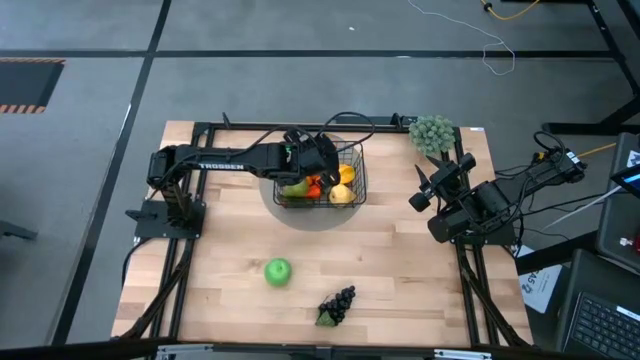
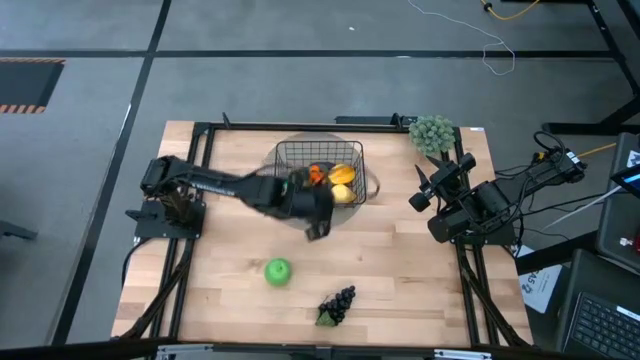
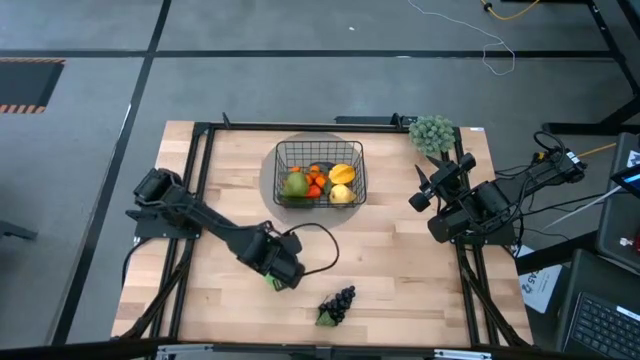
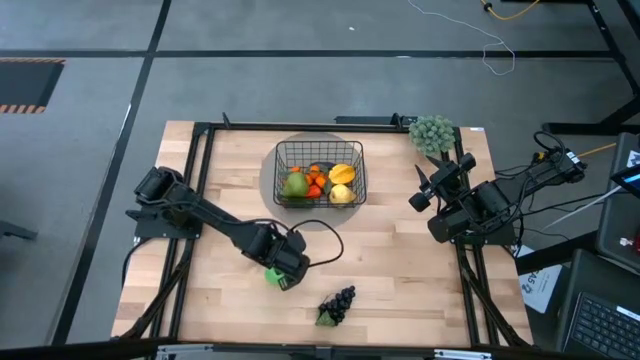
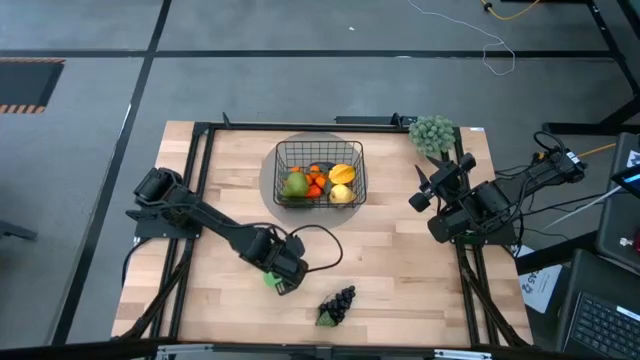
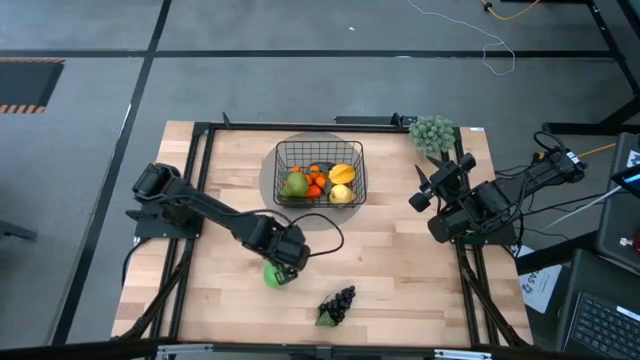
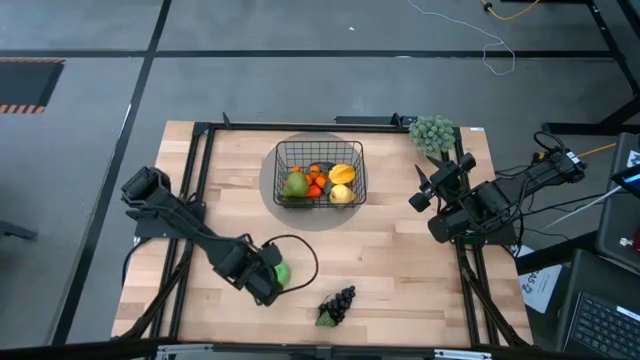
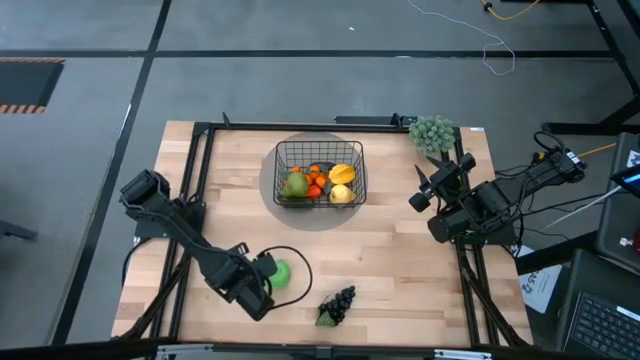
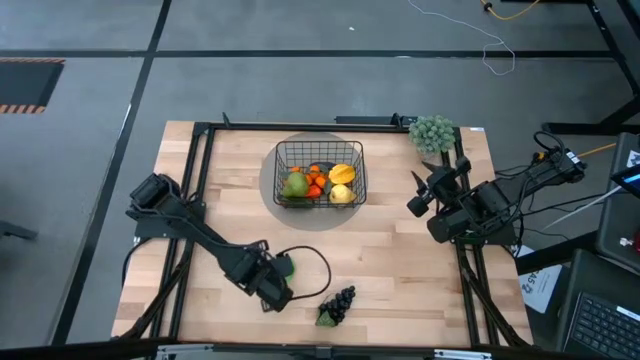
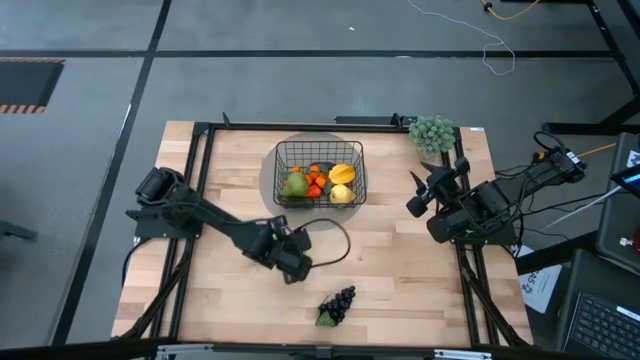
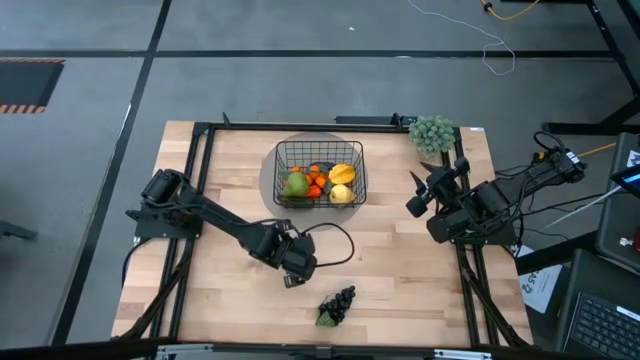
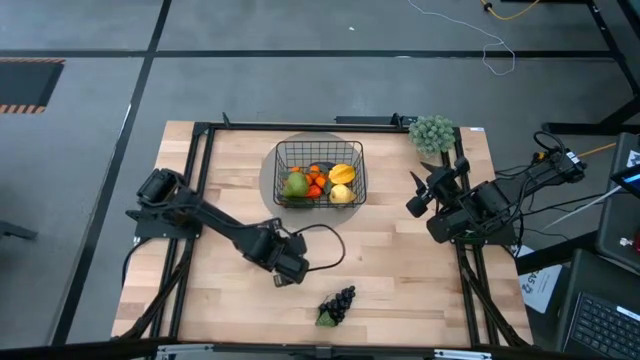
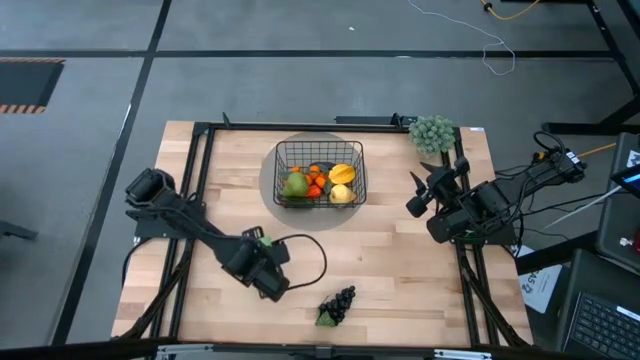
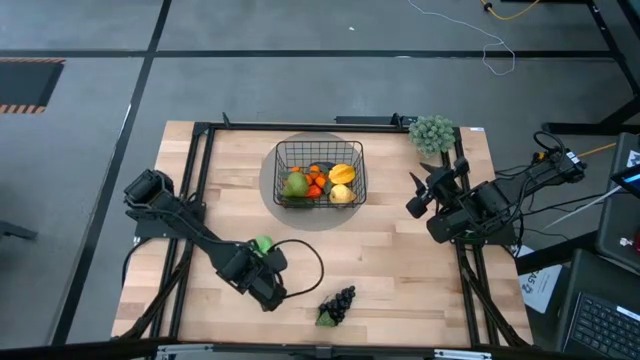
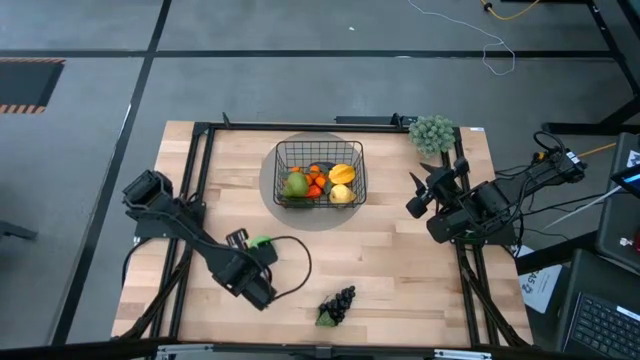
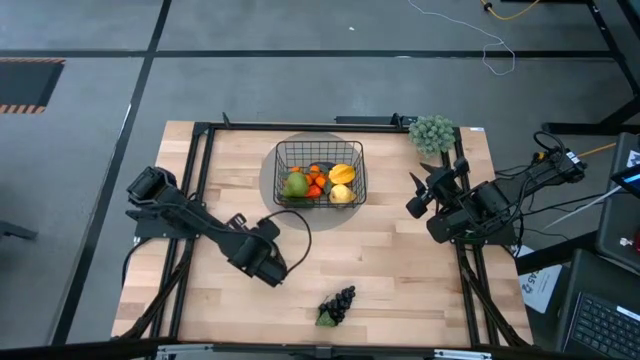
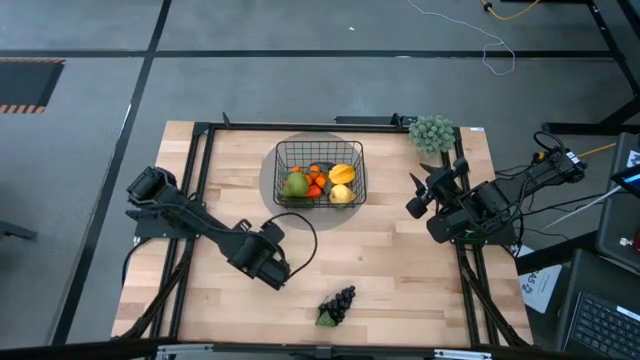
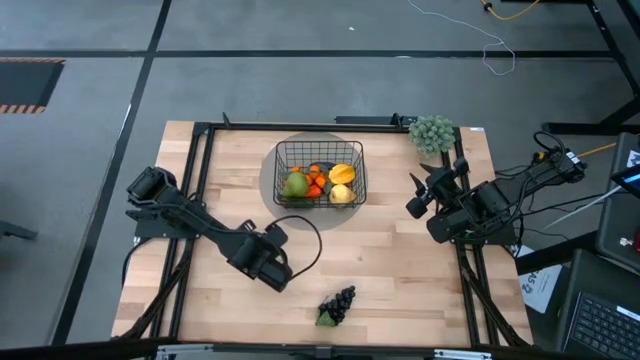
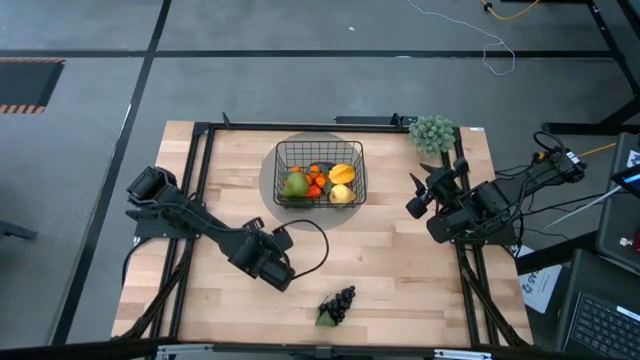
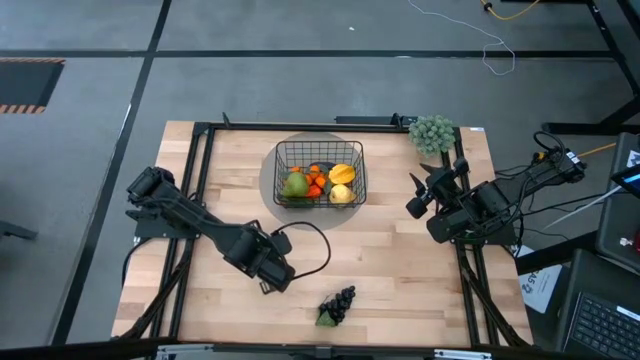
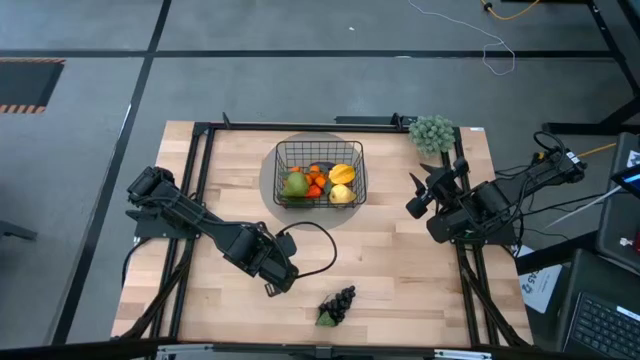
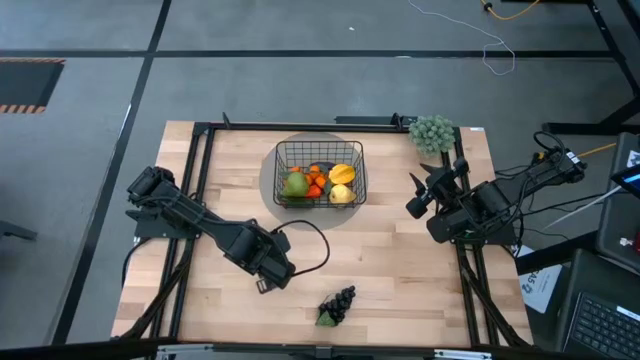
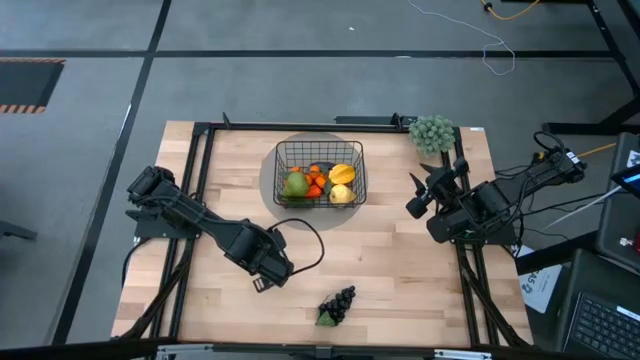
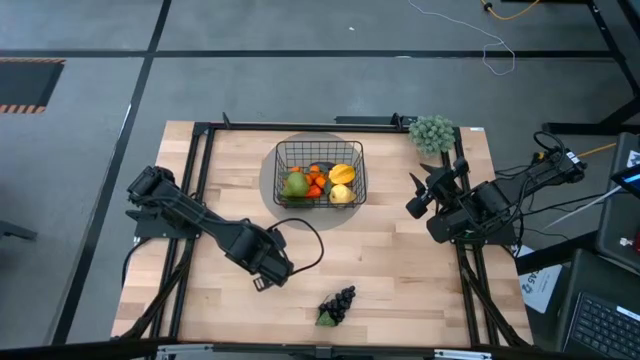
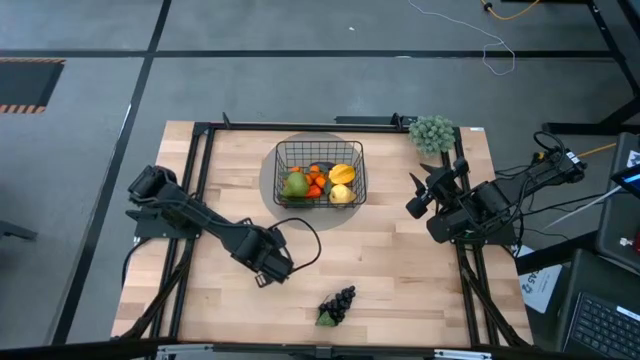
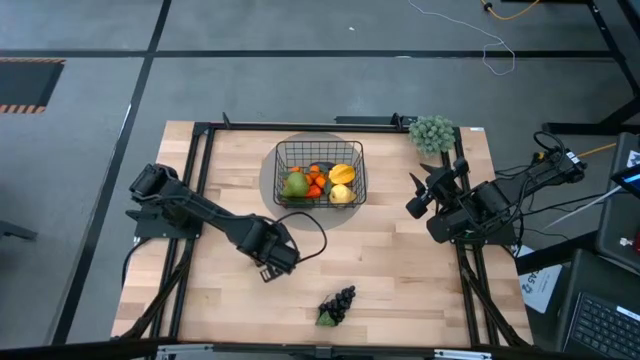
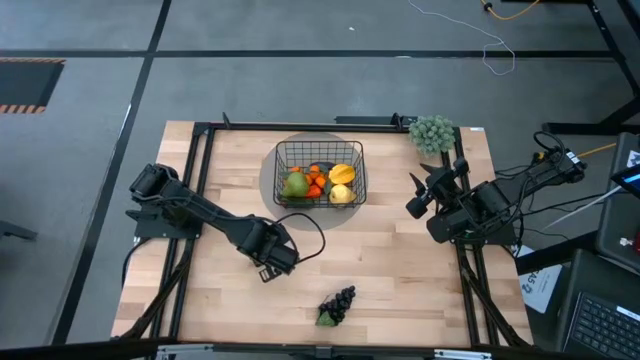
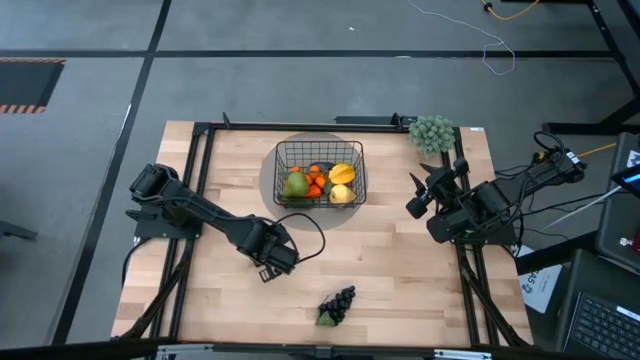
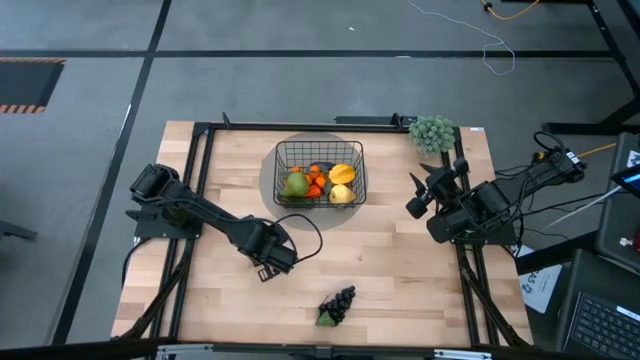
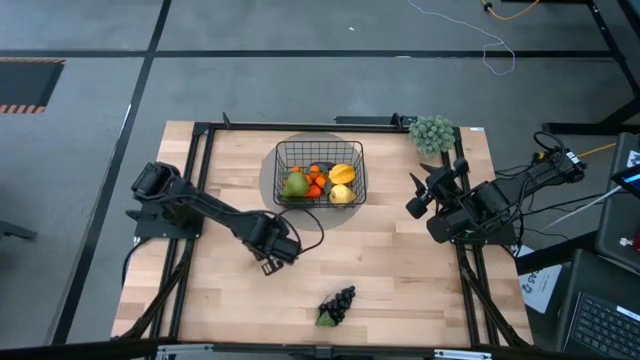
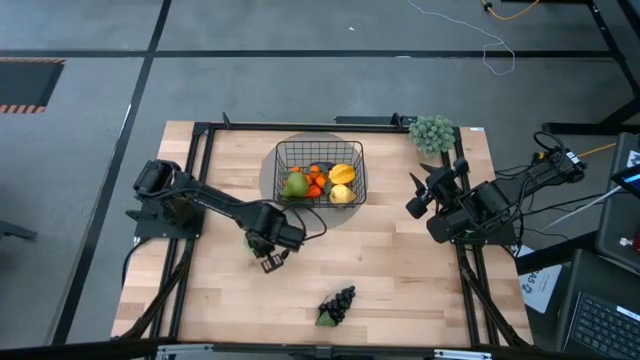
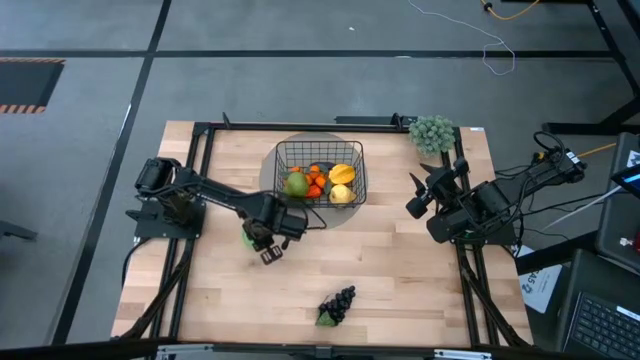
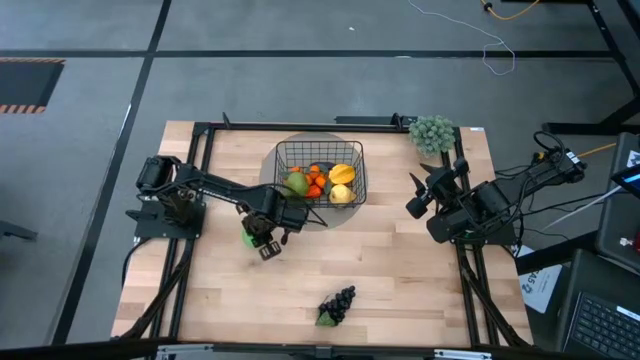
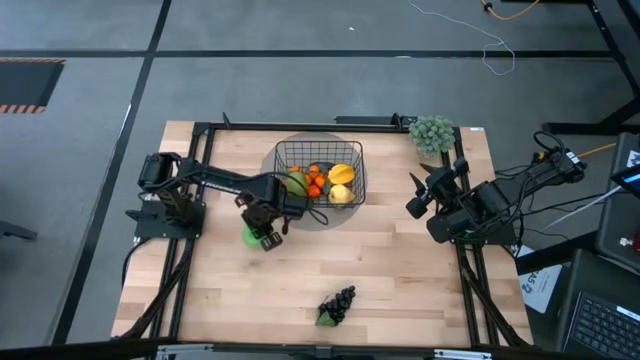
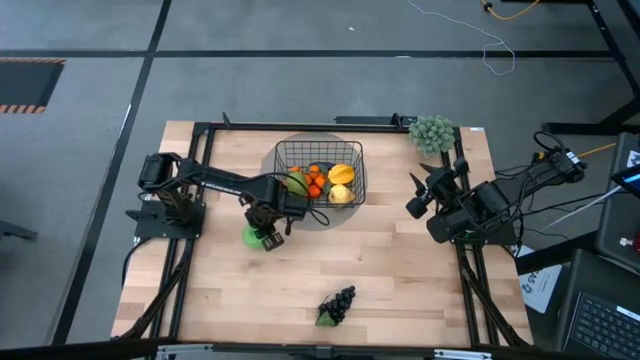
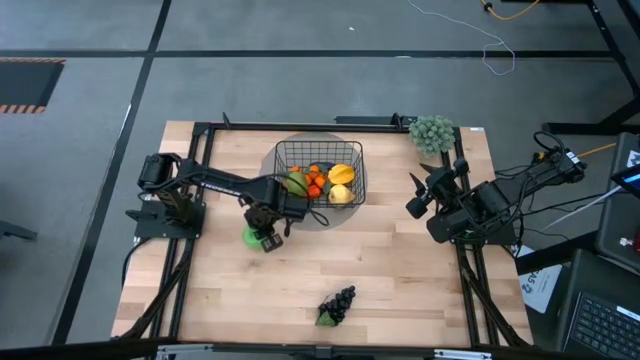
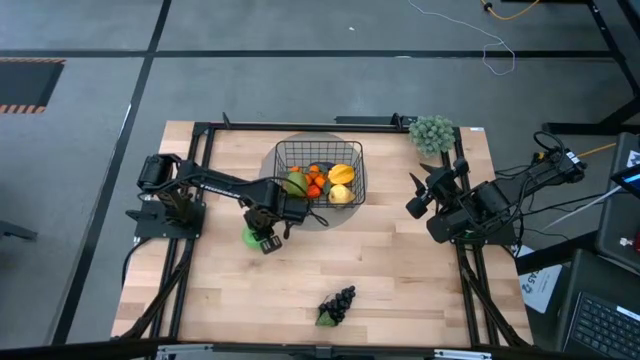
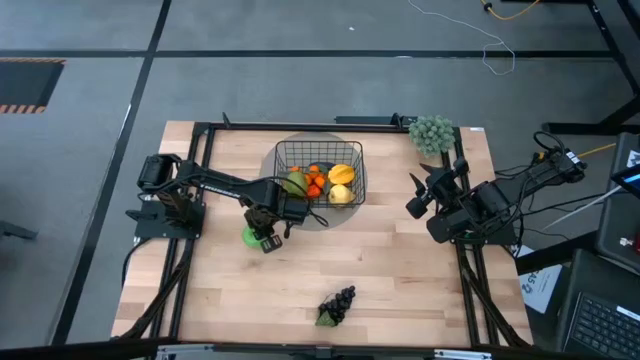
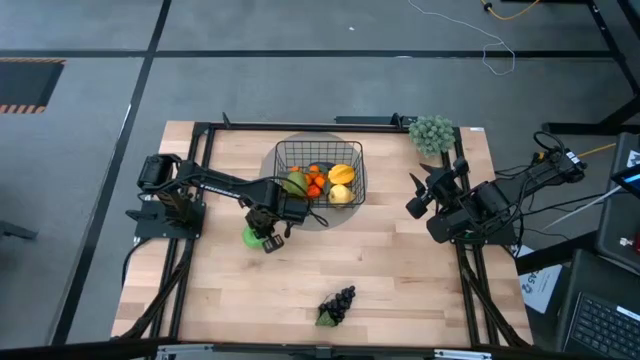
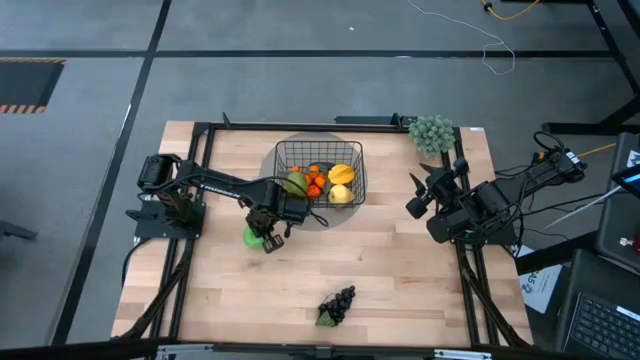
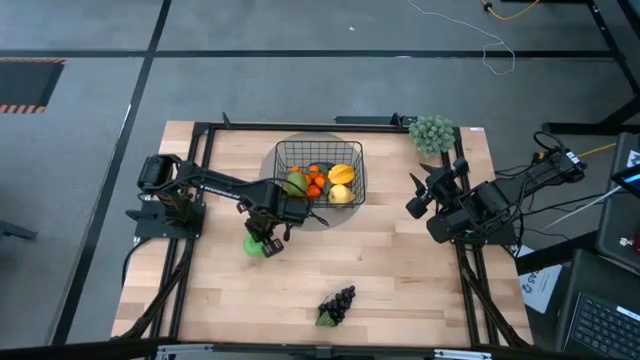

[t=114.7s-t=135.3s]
Task: Build produce basket
Put the green apple into the wire basket

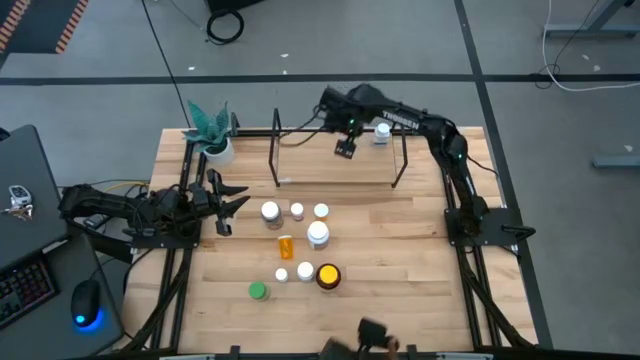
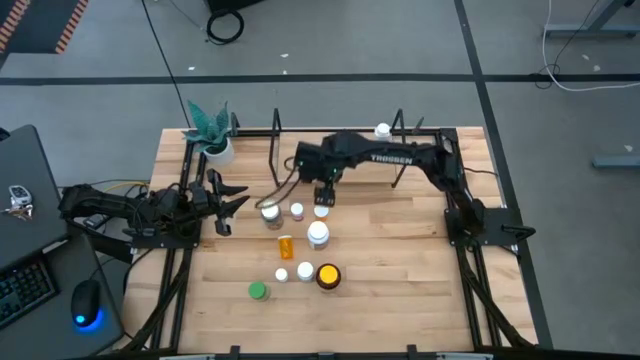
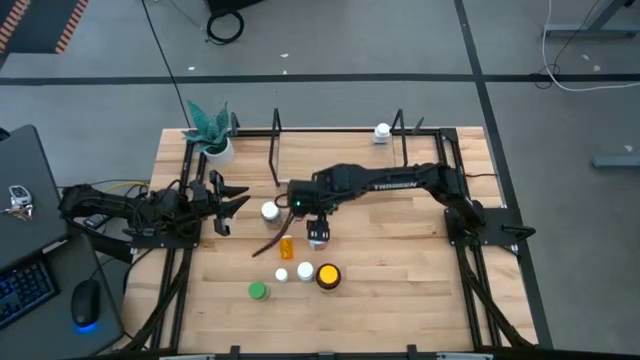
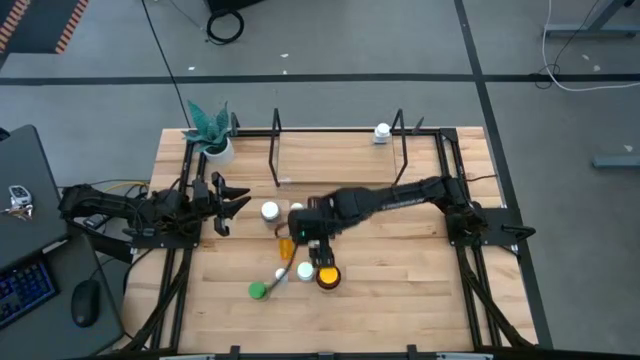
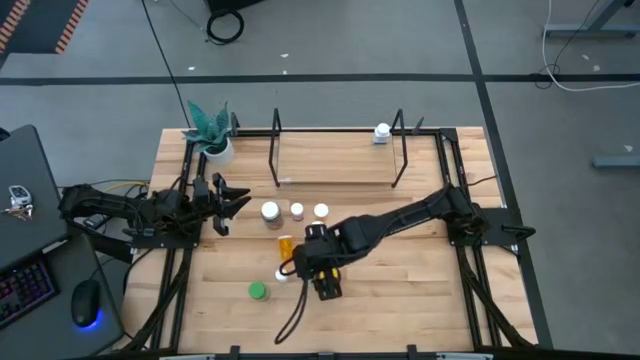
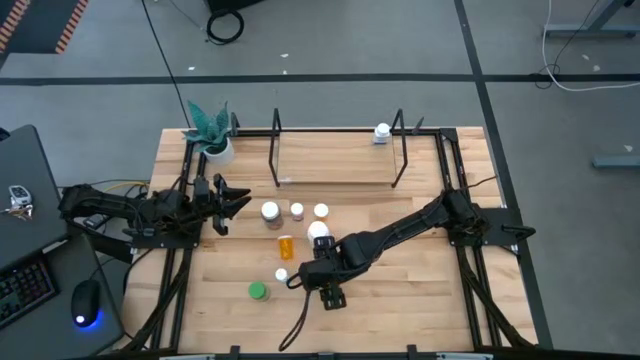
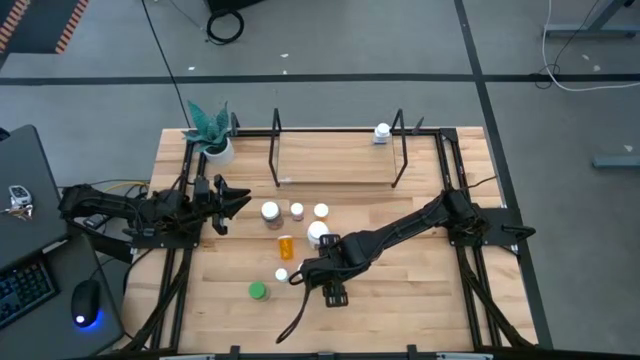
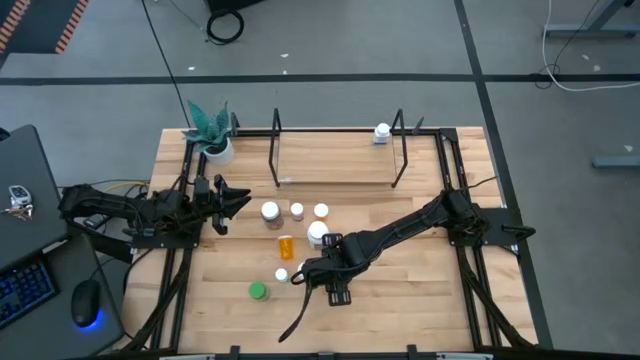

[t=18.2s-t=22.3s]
Task: Pick and place medicine bottles onto shelf by color
Put the yellow pill bottle on the shelf
